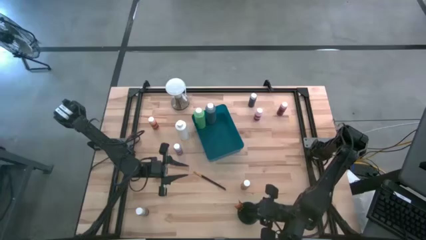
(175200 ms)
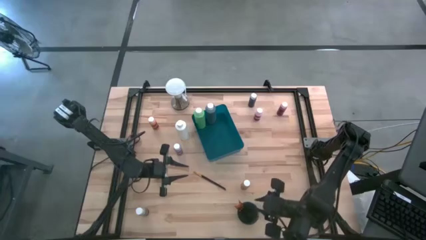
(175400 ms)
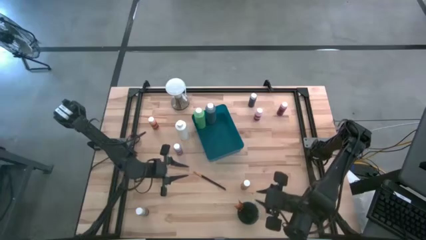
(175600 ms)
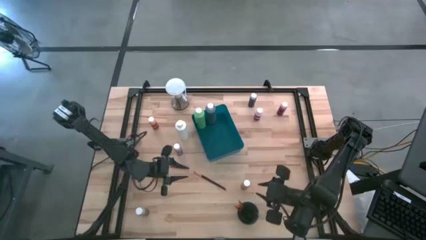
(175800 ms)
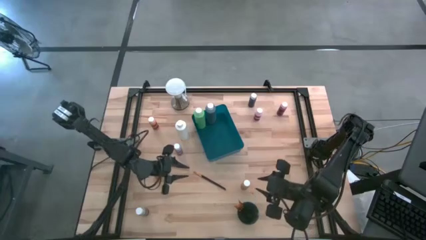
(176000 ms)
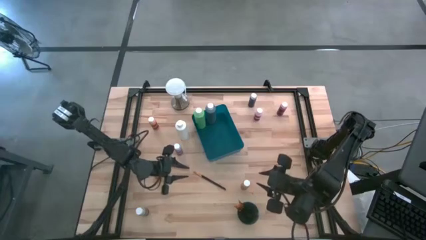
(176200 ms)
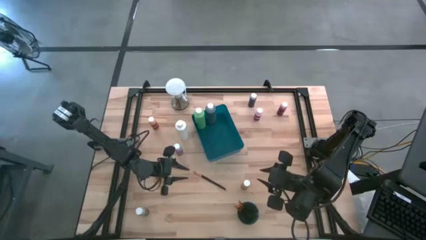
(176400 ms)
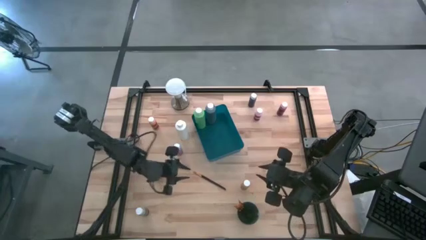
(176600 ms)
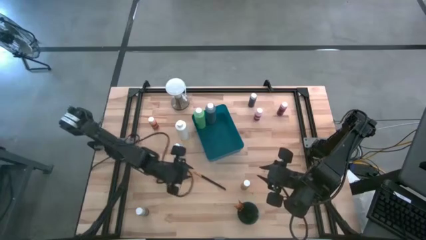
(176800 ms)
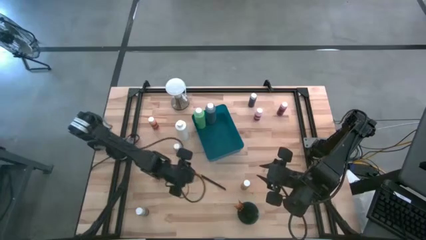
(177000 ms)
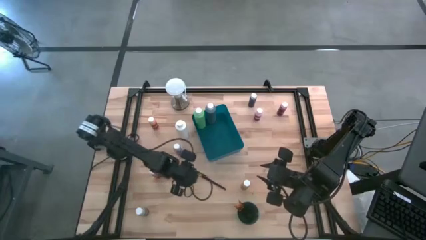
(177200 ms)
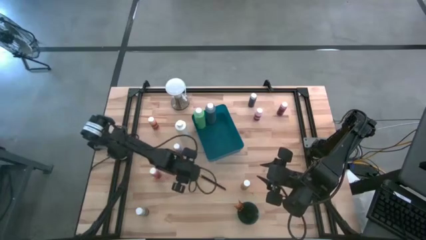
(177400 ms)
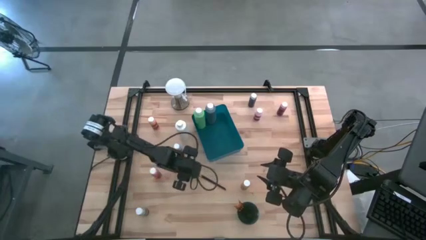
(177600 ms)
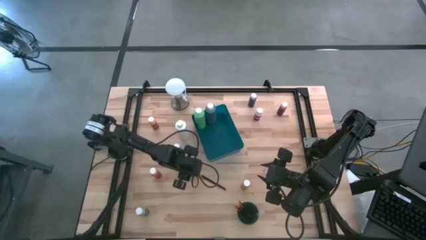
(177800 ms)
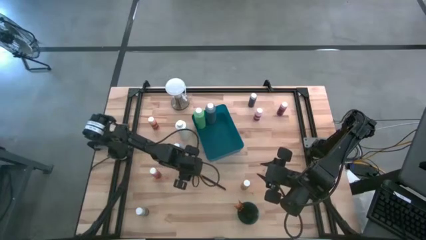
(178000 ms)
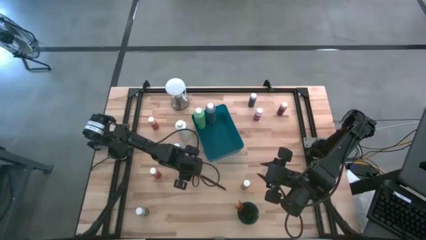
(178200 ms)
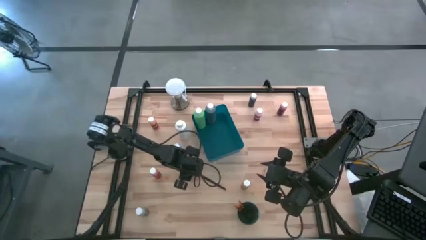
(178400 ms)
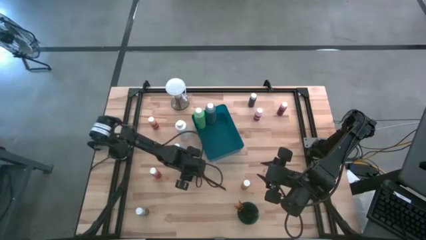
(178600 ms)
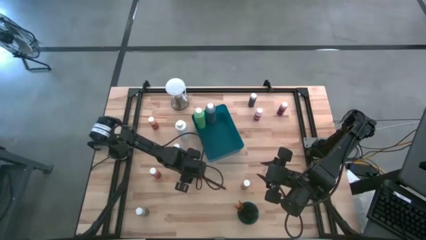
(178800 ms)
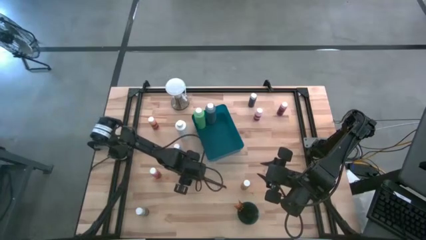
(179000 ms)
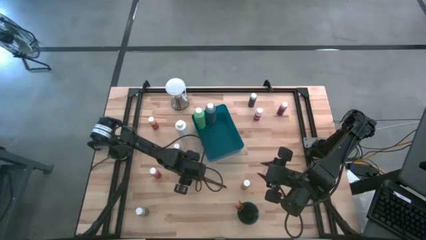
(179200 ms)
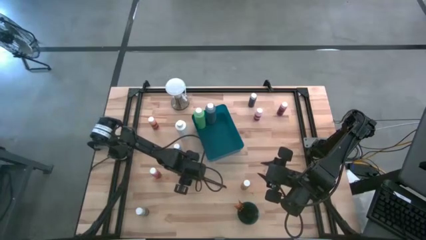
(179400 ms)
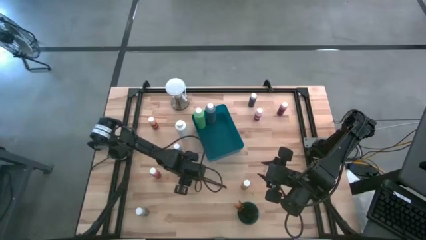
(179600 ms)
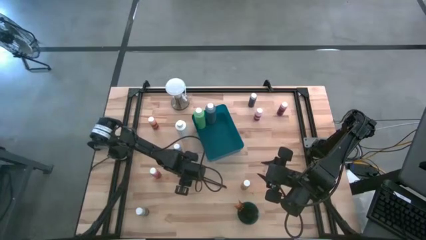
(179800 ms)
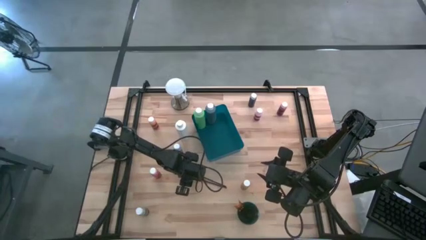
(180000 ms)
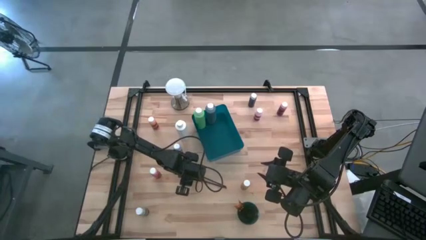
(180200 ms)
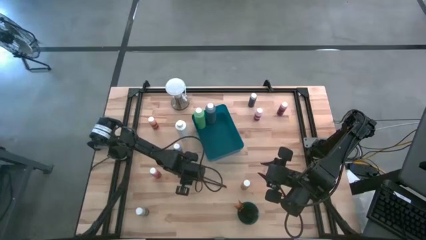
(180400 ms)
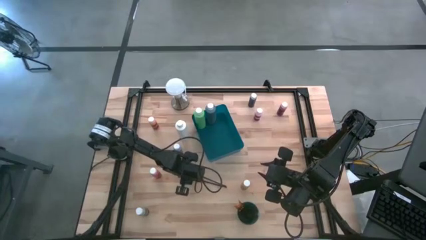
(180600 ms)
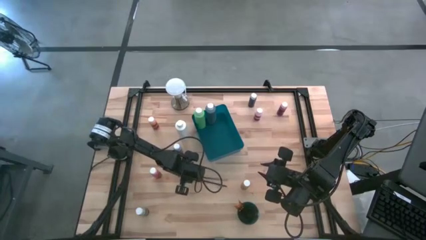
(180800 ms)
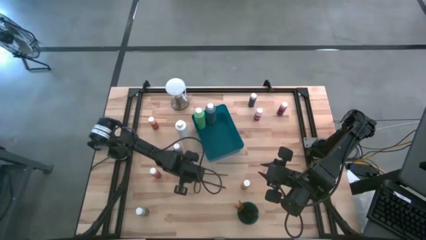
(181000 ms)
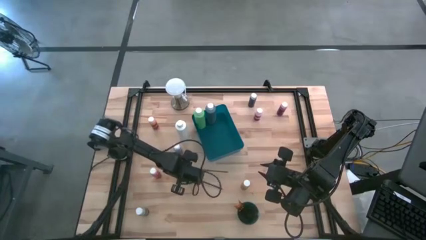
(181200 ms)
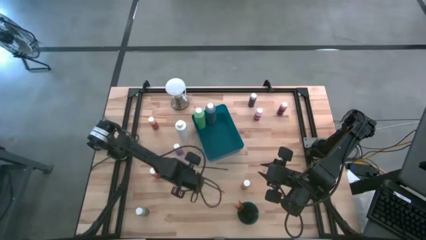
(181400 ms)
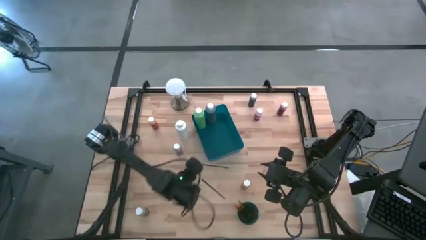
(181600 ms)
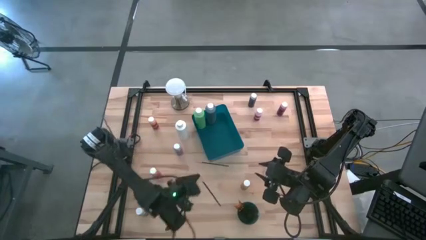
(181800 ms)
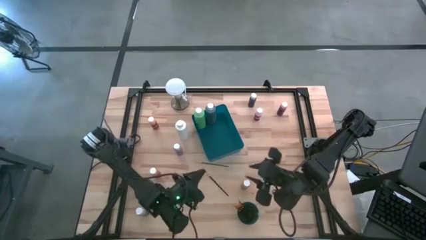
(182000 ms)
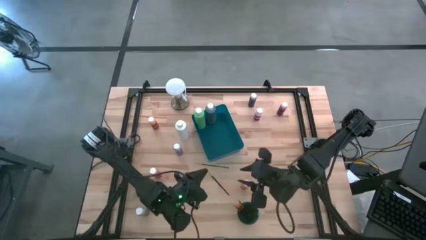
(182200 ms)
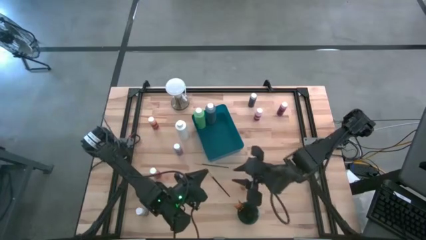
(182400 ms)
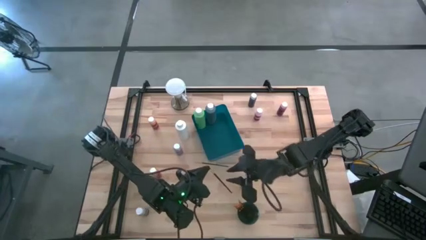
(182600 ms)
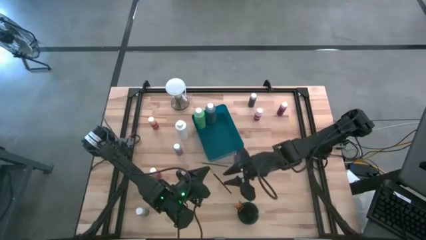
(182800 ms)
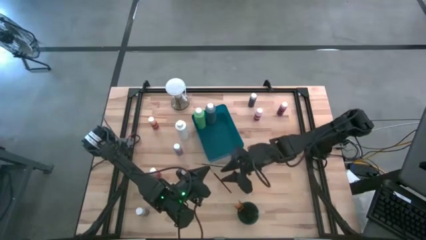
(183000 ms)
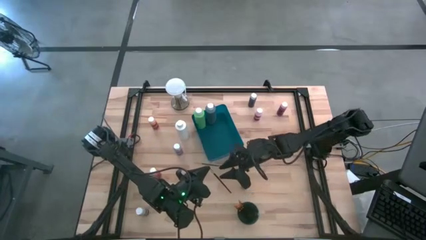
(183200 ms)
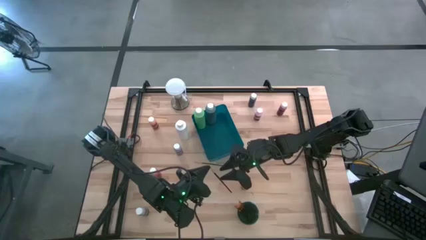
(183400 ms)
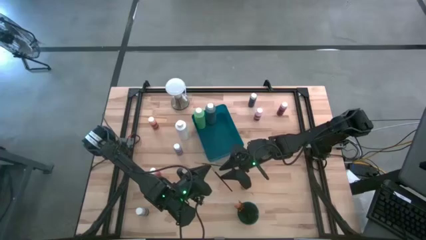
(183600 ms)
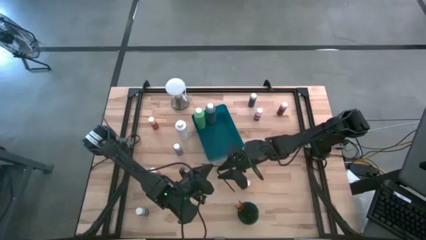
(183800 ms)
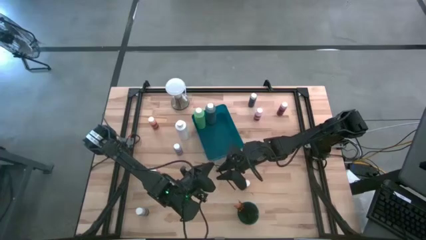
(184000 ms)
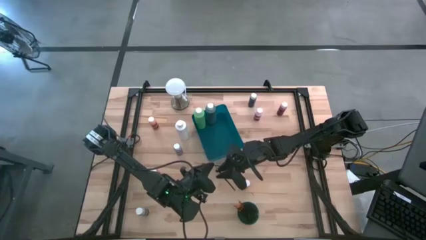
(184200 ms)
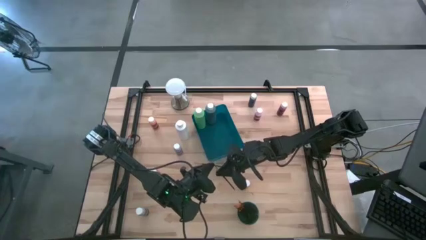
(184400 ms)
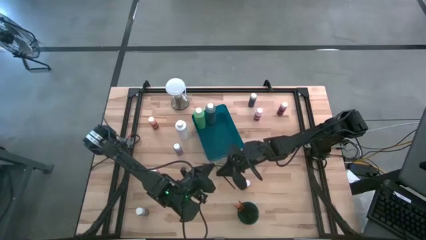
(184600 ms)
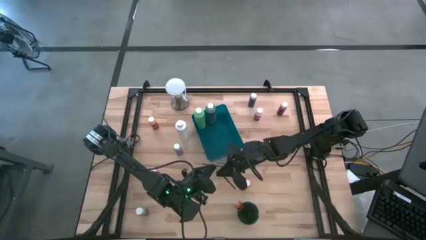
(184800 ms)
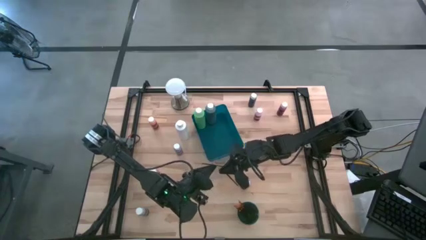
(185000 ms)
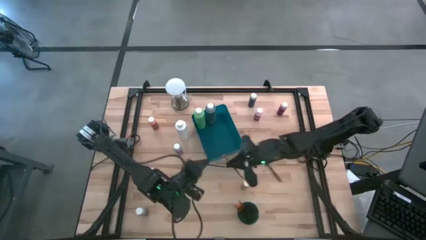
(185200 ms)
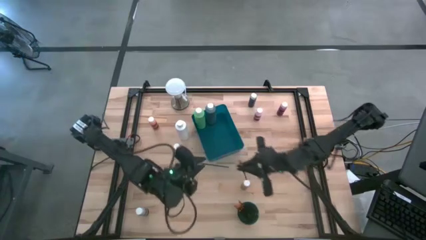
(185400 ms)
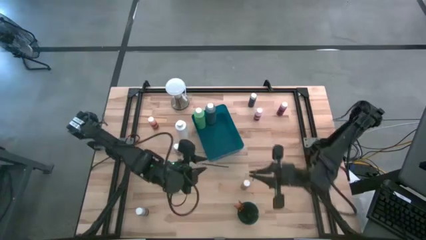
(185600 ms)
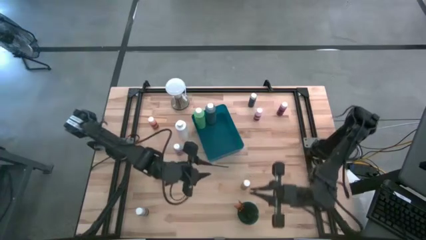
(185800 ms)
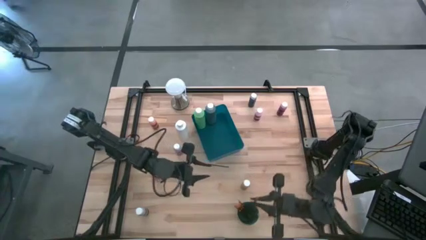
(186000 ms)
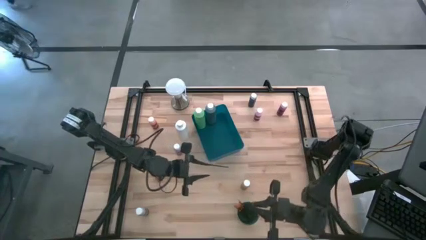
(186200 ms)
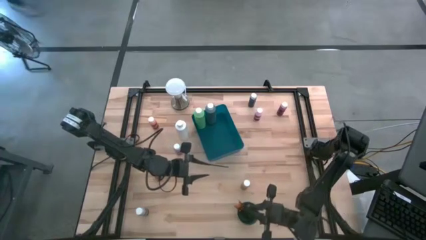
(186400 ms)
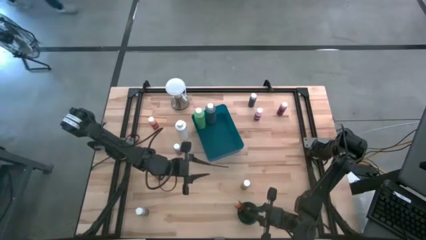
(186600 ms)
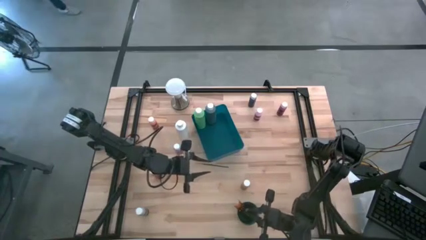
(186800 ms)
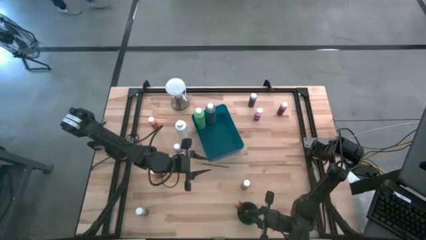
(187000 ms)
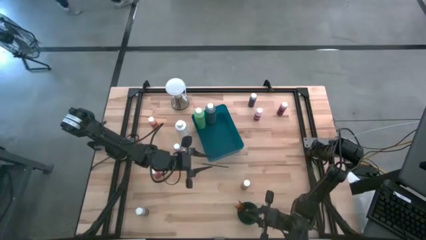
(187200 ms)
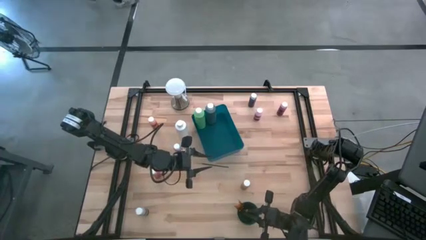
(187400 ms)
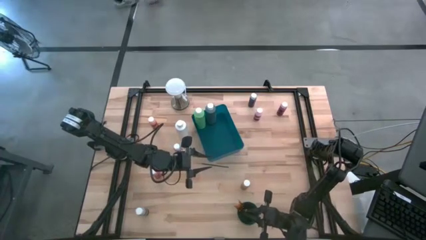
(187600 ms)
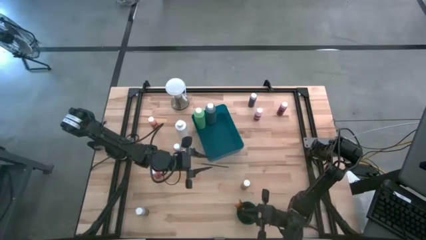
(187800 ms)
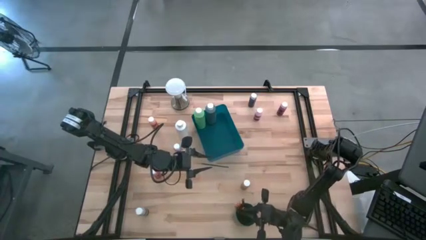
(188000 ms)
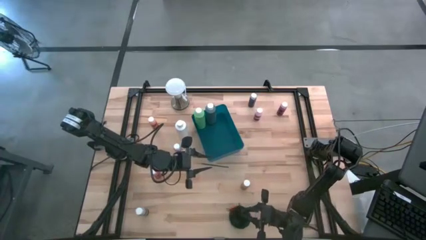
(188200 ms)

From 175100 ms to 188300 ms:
Task: Pick & Place Paint Supplies
Put the gold paint brush into the green cup

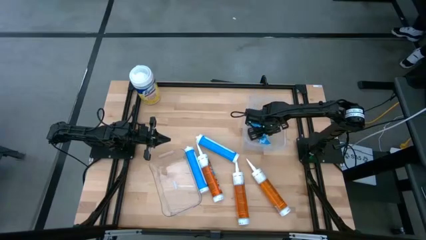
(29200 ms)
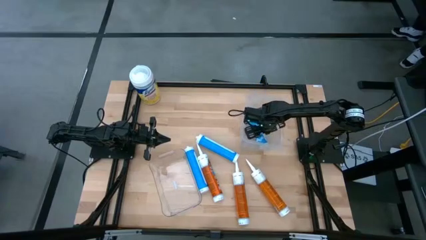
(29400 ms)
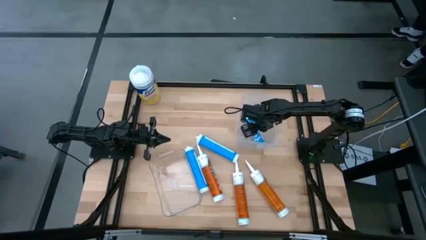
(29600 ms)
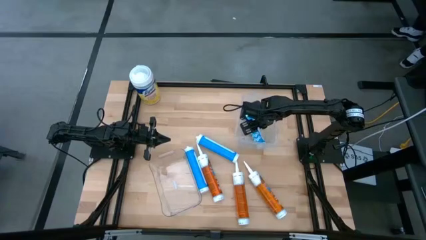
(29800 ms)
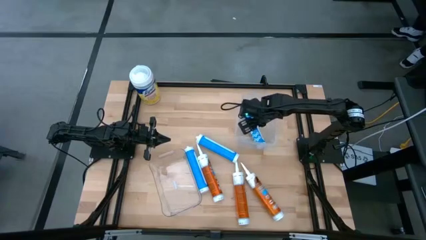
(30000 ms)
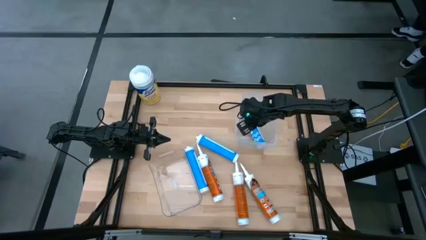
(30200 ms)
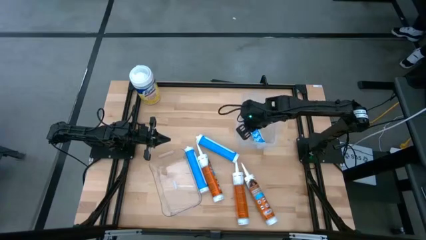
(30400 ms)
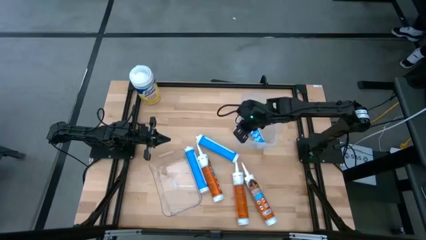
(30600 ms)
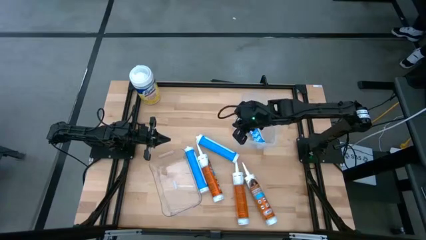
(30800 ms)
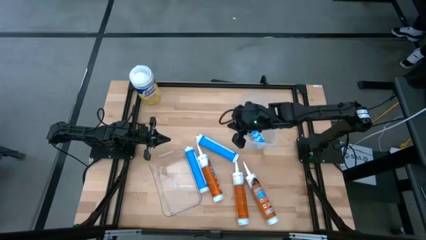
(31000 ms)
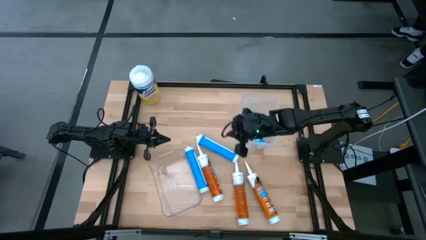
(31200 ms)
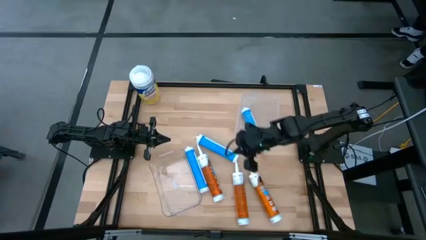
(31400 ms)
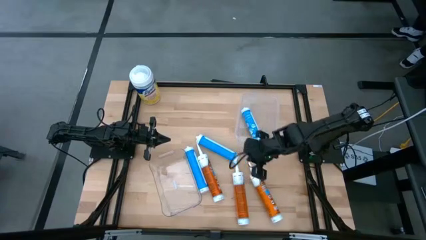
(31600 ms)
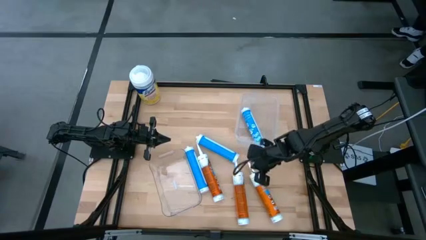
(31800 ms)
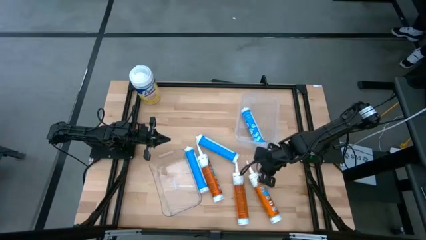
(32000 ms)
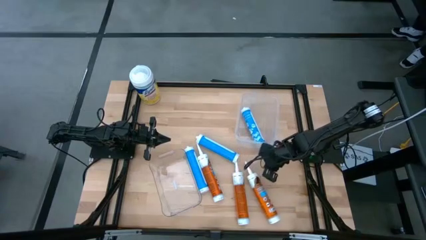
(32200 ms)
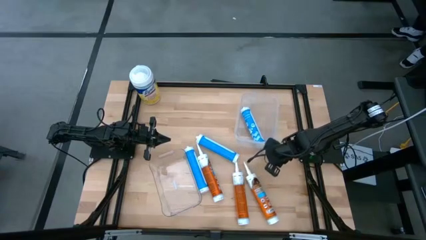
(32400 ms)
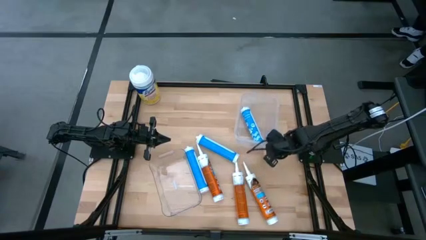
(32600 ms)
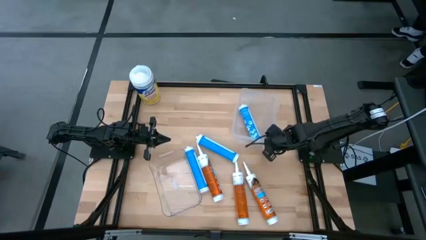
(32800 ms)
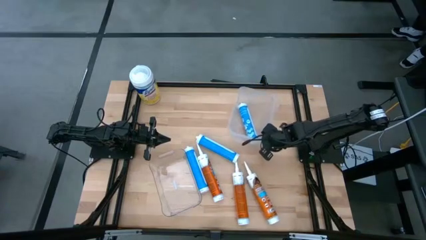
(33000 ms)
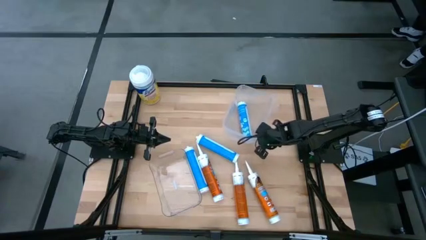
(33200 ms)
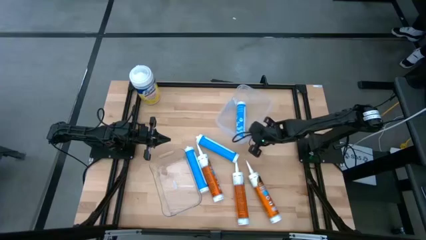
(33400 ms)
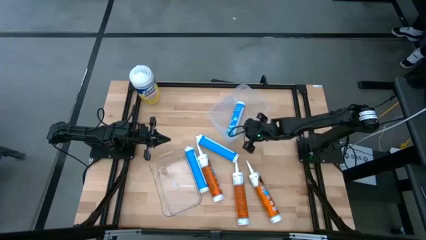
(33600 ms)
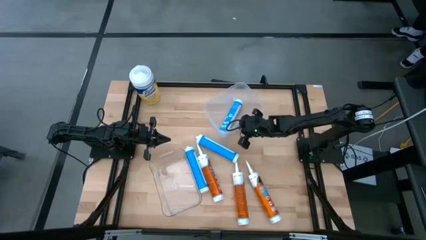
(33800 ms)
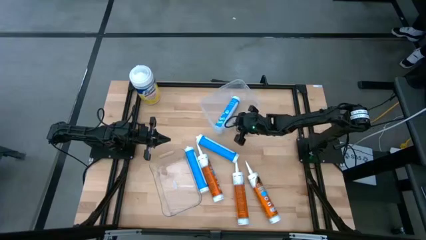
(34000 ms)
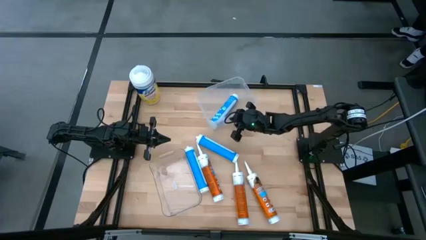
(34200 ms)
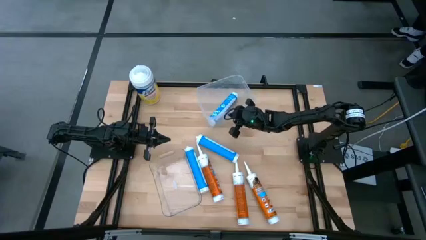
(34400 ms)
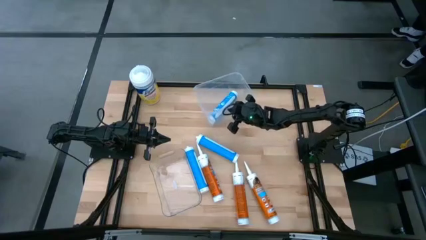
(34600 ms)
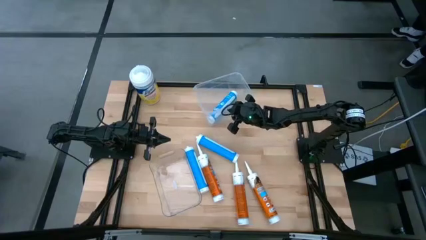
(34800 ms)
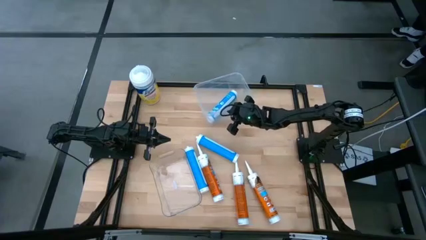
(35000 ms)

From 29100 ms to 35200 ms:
Task: Pick & place silicon tubes, Sealant and Lysol wipes
Move the white bin to the top center of the table
